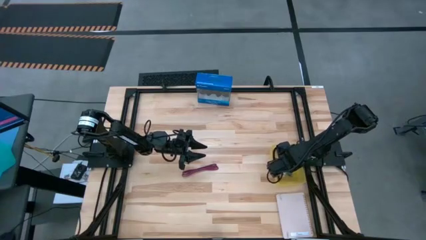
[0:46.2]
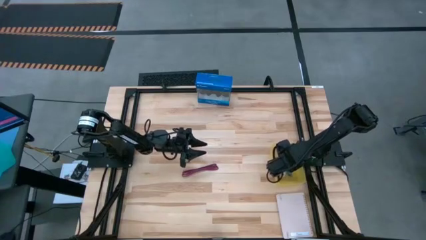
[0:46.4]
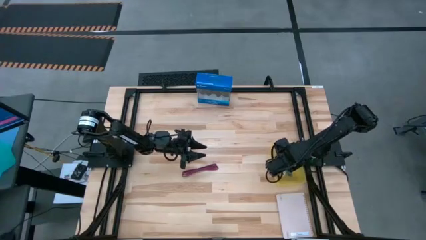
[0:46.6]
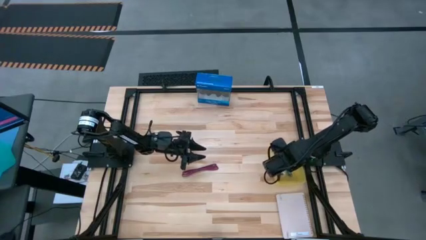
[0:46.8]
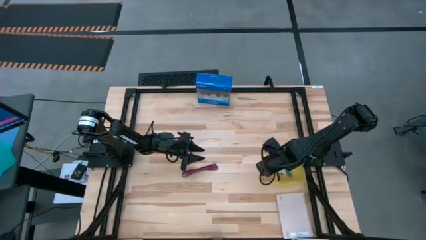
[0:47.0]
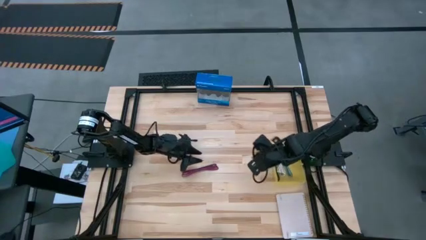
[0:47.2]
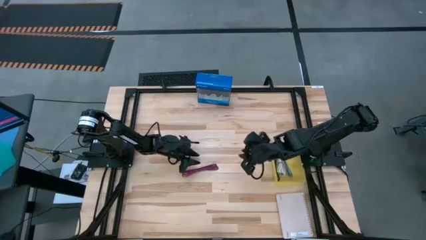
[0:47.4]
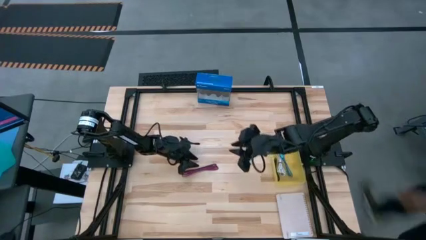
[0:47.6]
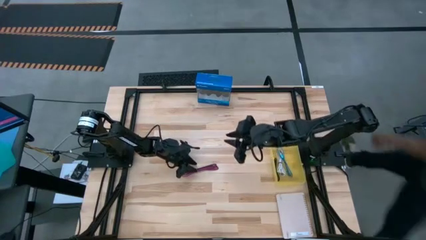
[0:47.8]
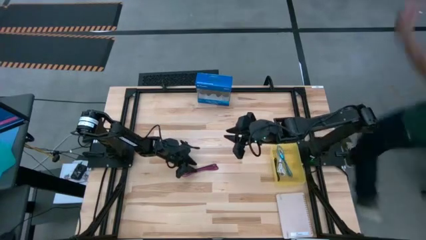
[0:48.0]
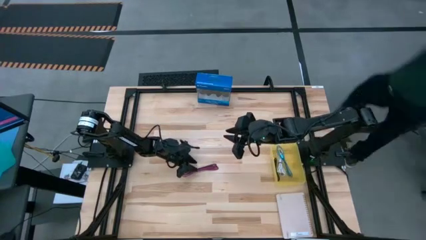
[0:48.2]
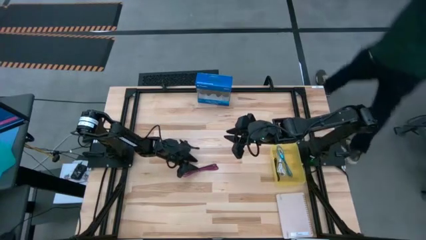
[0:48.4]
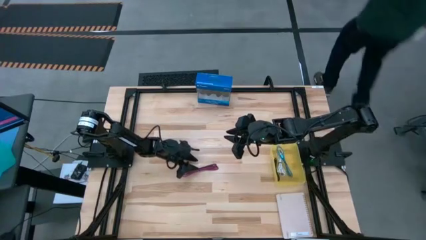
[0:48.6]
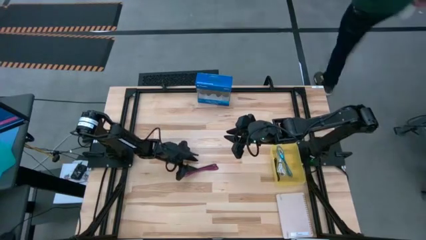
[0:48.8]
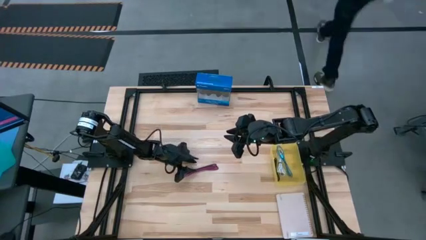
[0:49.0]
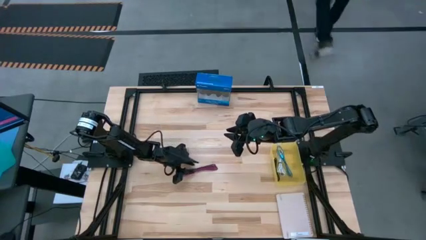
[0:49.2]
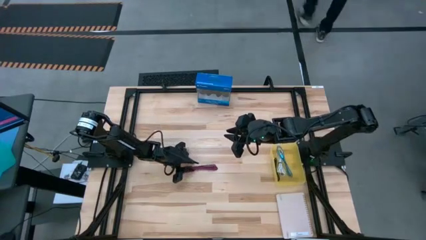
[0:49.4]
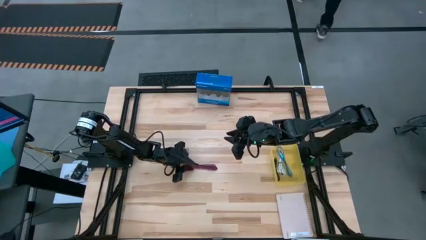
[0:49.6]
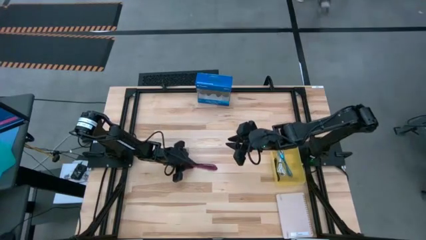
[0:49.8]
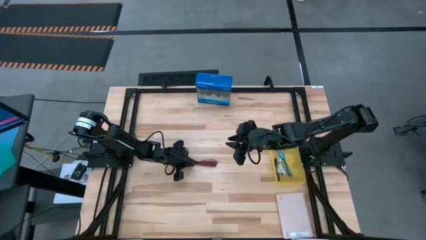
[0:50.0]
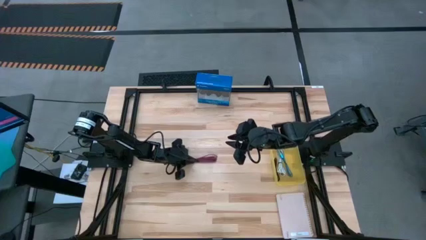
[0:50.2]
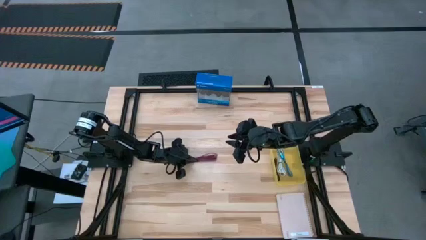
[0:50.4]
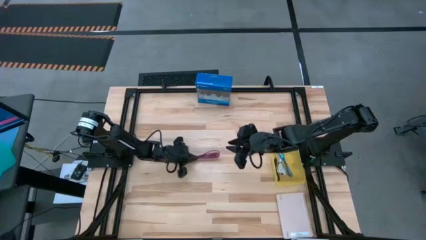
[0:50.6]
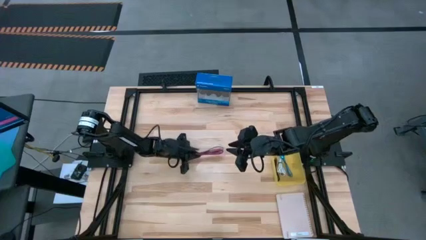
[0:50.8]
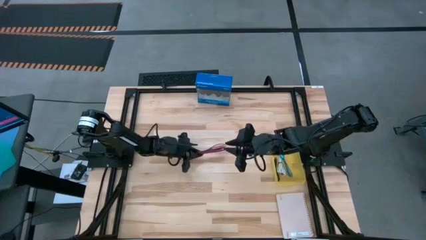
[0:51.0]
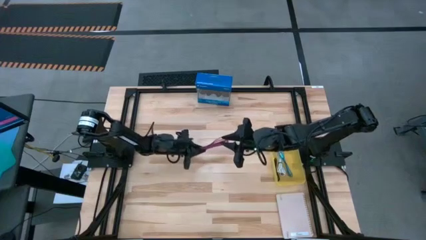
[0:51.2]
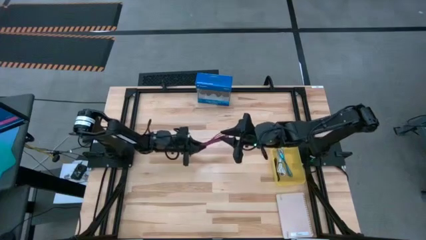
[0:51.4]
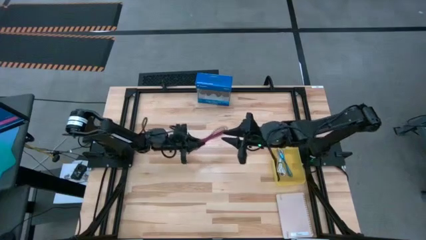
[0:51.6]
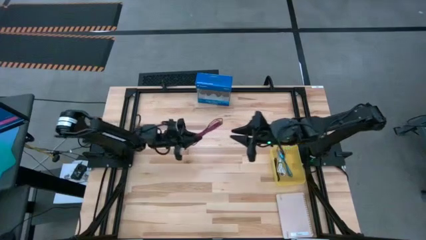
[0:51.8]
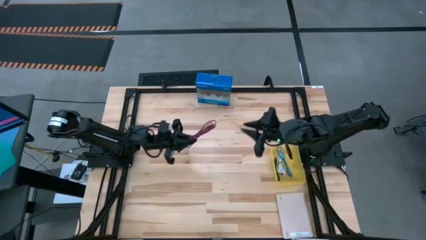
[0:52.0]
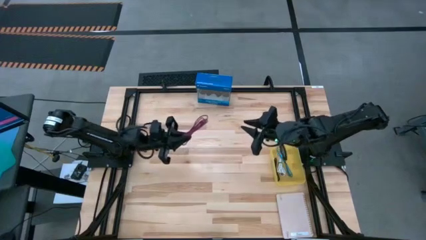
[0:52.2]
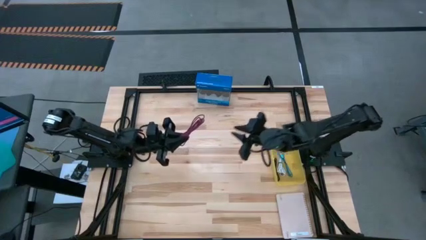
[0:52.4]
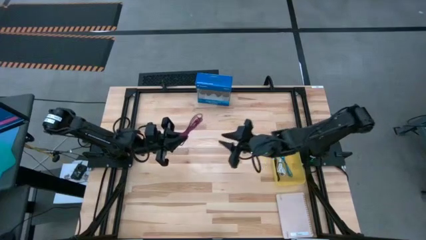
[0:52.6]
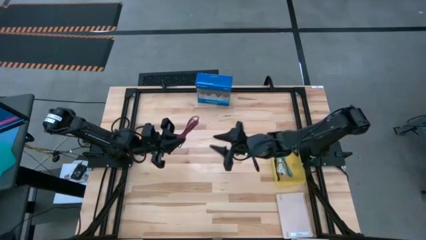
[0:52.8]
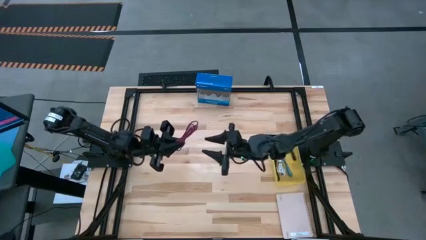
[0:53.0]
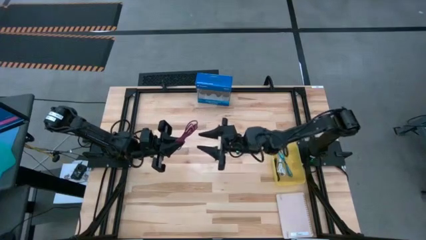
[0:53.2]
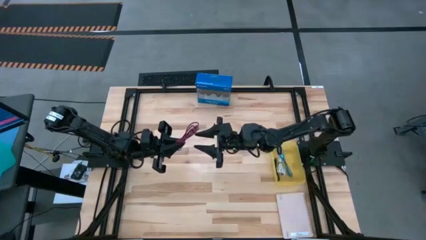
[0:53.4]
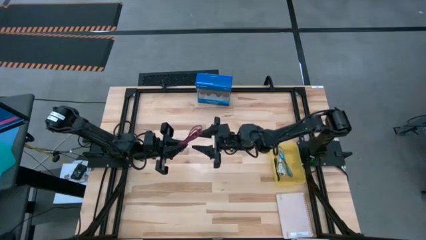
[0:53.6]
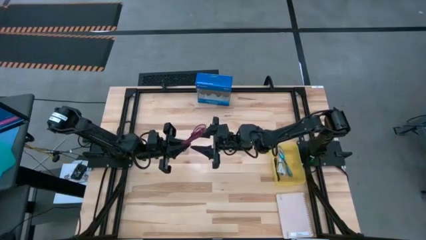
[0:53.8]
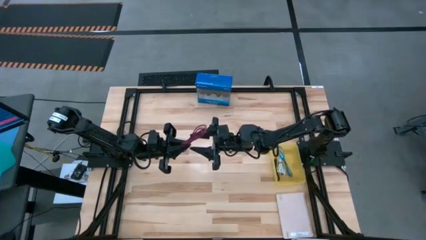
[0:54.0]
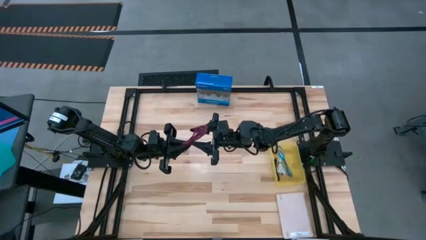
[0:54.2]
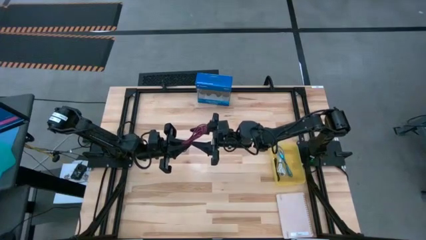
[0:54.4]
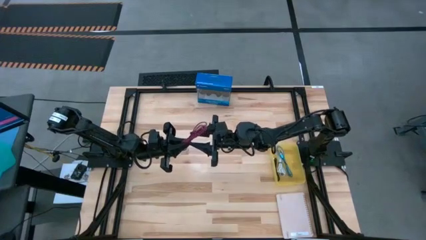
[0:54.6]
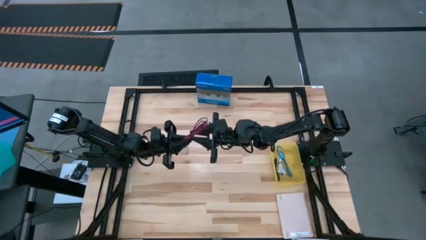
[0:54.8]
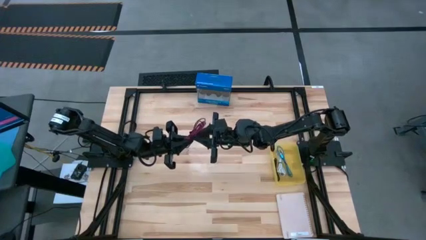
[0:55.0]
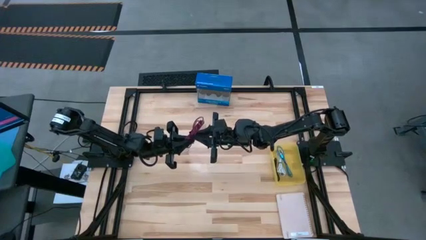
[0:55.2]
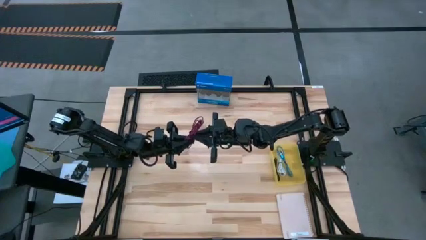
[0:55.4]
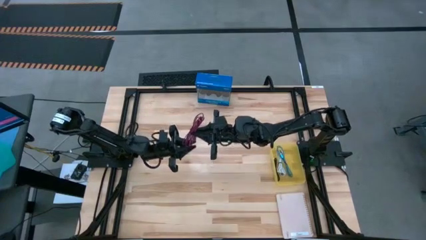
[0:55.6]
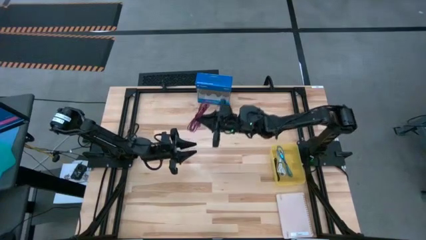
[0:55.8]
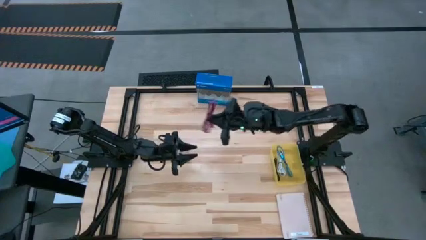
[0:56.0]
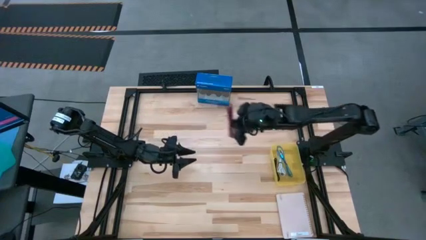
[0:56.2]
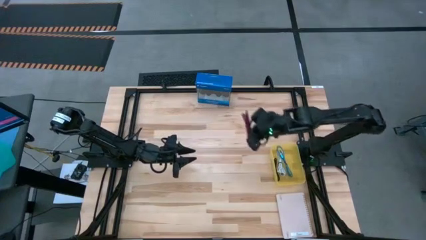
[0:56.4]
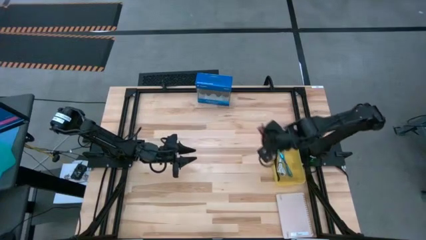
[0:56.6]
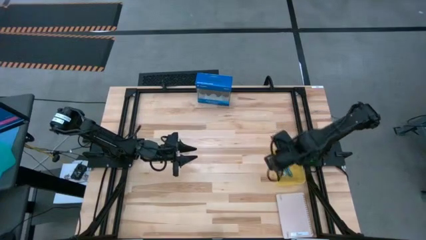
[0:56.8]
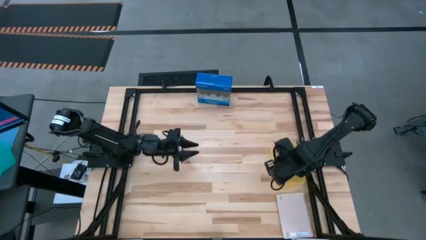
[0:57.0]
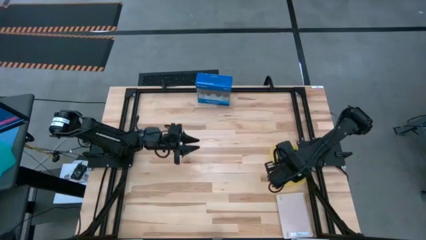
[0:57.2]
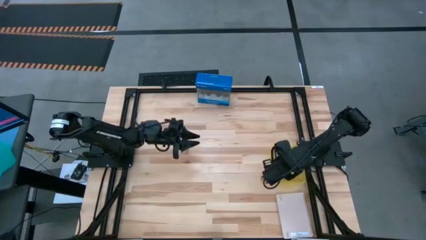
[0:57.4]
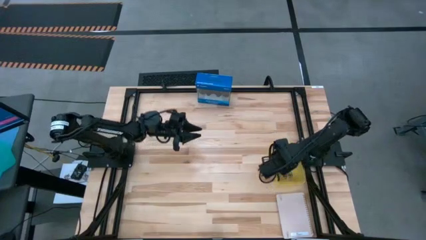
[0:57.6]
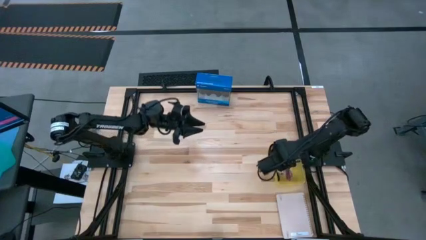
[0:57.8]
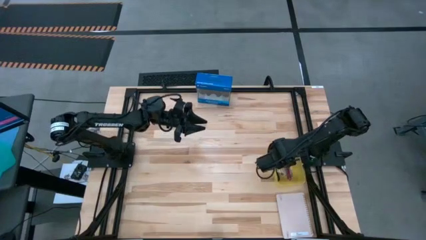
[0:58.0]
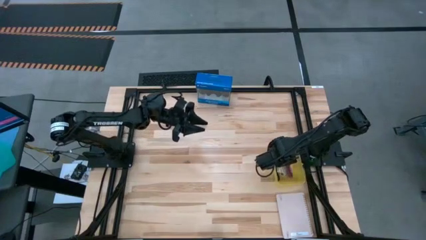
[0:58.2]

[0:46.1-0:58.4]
Task: Pick and place USB-C Cables
Put the pink charger cable into the yellow bin
